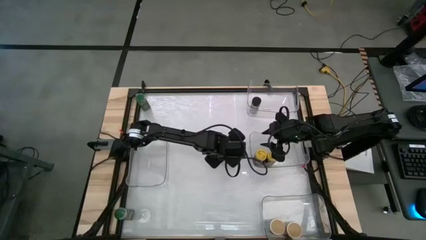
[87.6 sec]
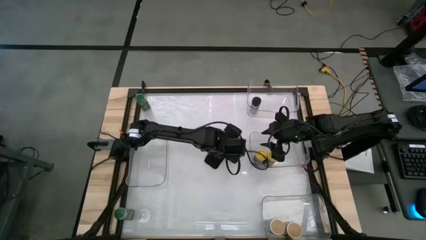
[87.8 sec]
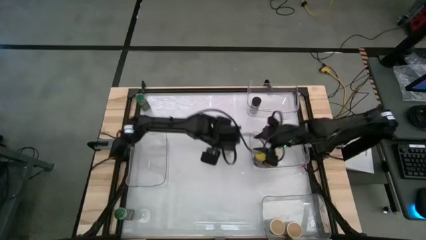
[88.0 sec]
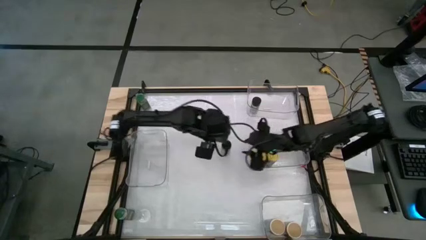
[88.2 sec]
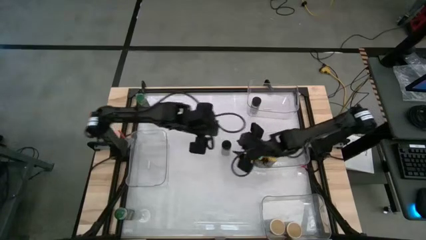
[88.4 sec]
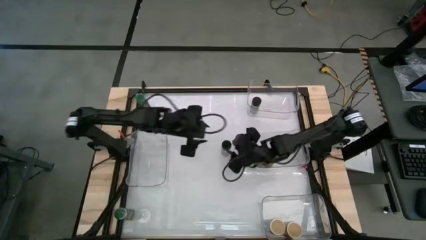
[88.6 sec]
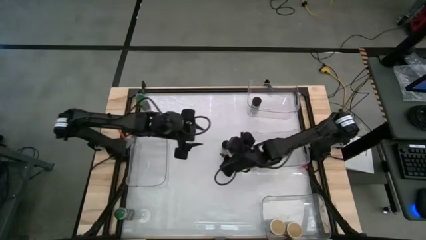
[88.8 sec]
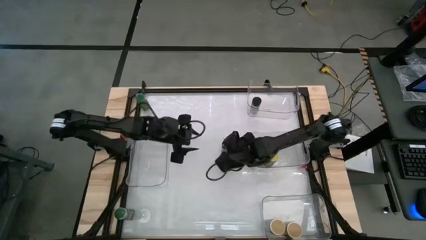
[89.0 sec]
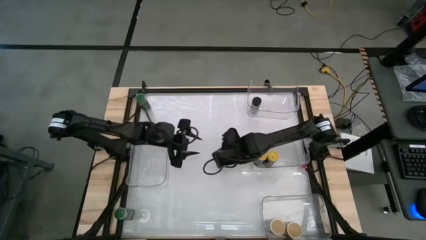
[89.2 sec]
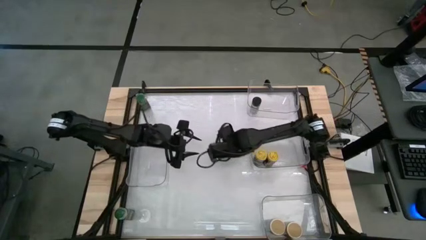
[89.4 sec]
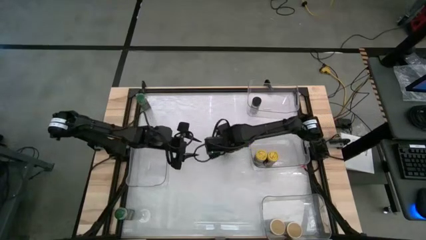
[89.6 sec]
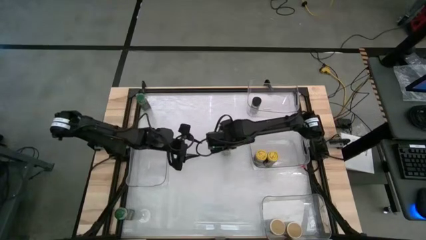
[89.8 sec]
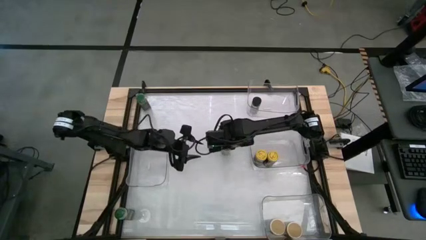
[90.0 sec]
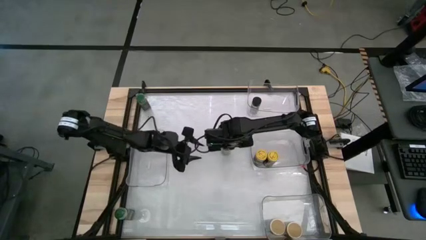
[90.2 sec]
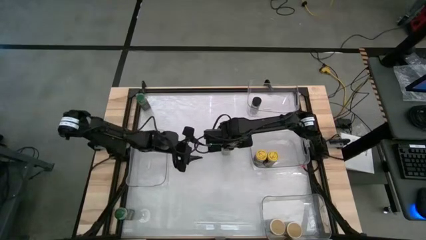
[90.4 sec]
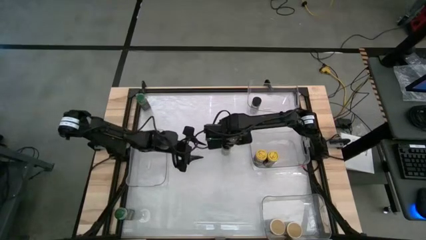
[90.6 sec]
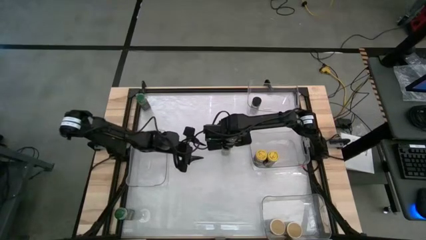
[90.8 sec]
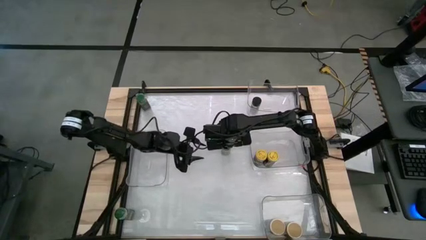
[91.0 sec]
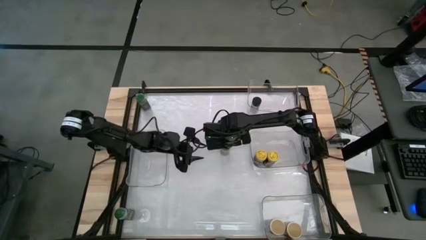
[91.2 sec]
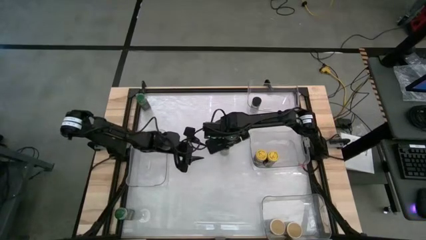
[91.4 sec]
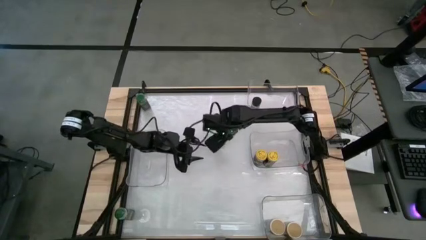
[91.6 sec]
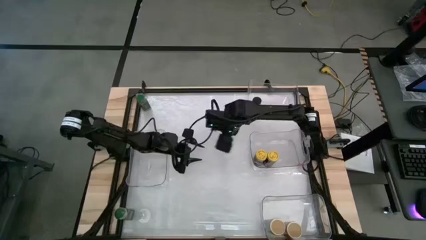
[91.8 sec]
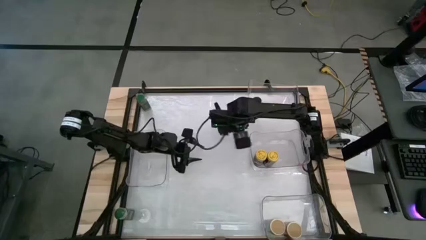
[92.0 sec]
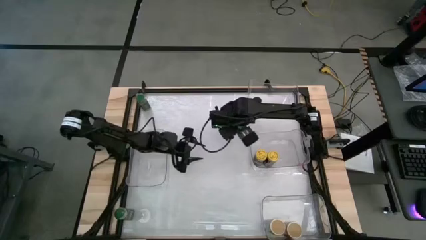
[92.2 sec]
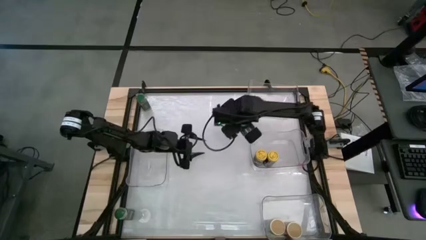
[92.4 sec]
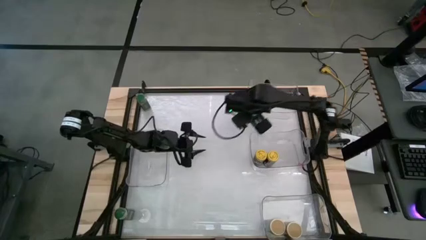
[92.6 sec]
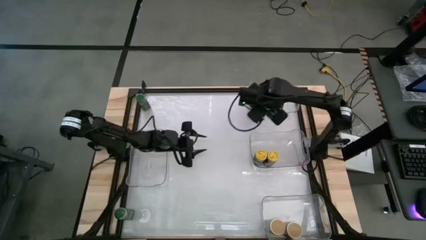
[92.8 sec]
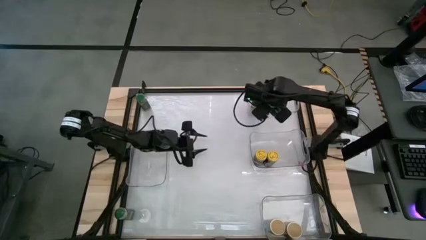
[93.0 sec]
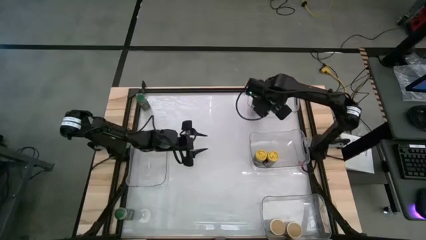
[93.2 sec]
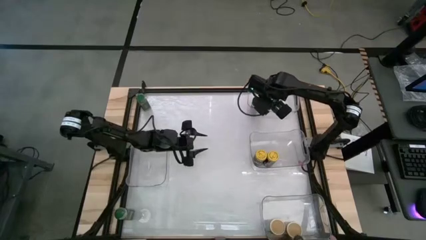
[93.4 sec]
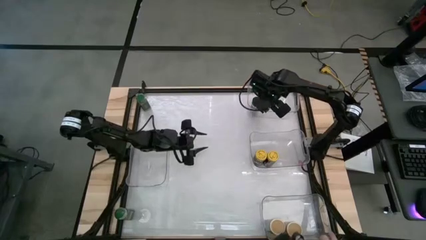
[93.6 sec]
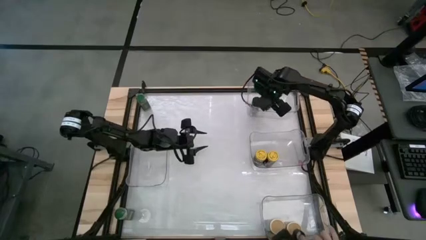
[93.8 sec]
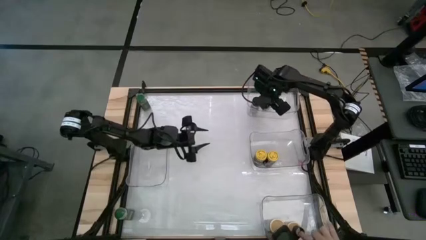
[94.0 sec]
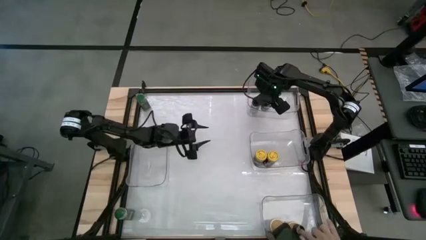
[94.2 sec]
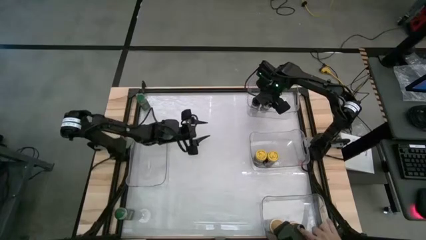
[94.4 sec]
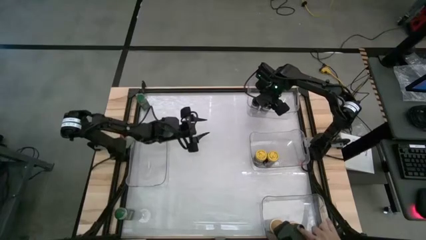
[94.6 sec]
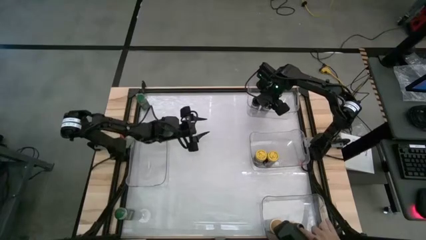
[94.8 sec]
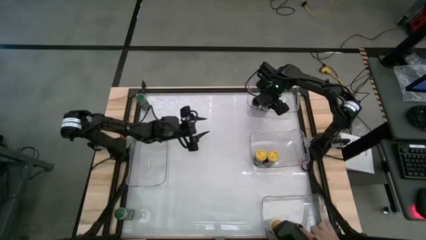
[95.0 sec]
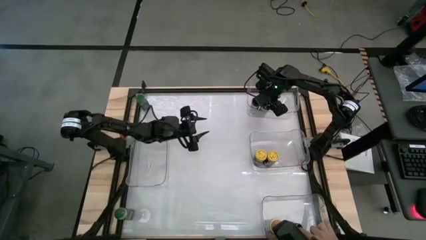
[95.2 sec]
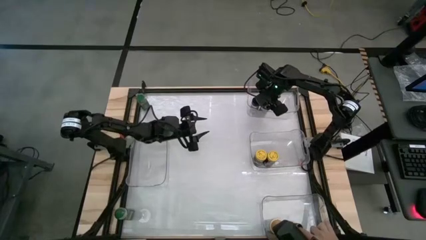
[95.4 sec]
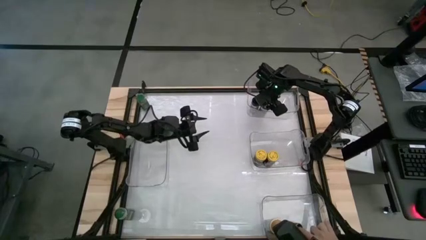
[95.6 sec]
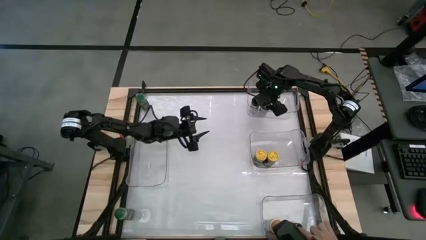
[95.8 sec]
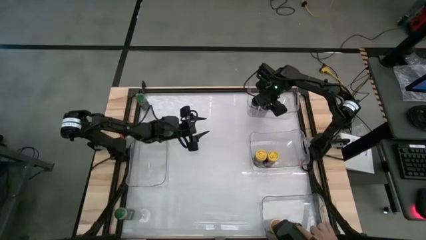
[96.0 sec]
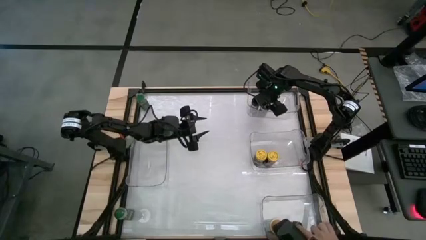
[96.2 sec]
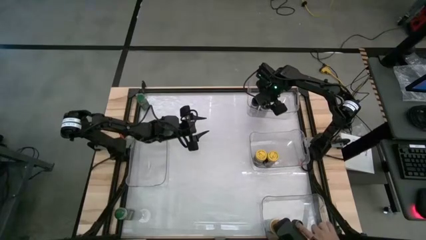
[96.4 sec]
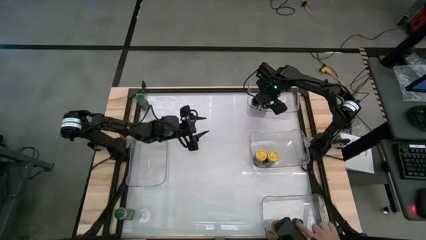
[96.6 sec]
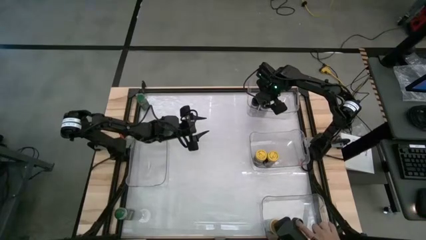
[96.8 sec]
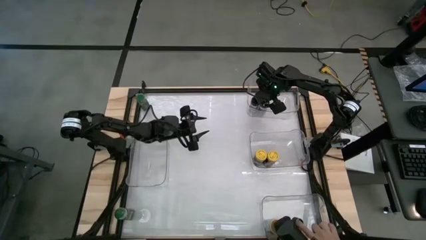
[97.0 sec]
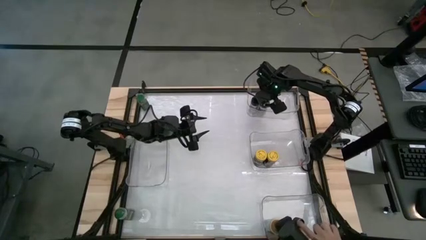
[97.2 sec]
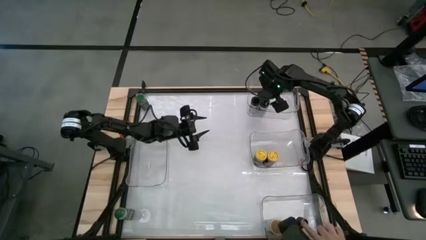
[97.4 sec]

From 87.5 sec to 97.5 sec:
Task: Sort spices by type
Put the black seasoning bottle into the top right transparent bin
